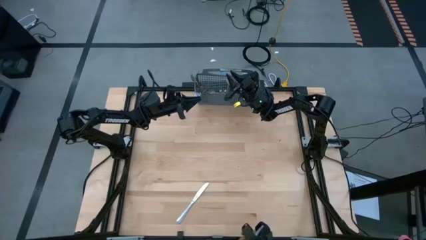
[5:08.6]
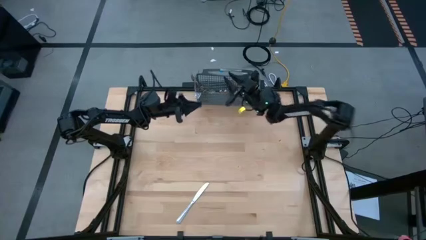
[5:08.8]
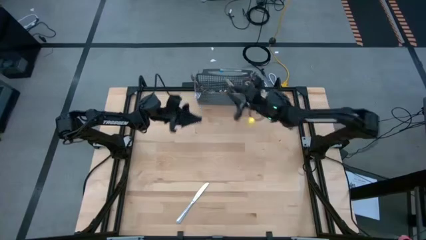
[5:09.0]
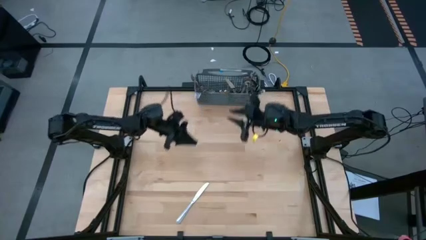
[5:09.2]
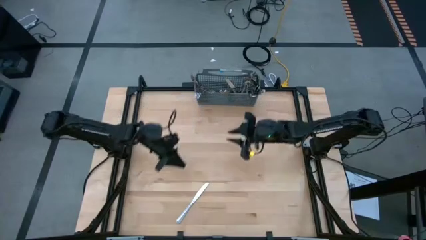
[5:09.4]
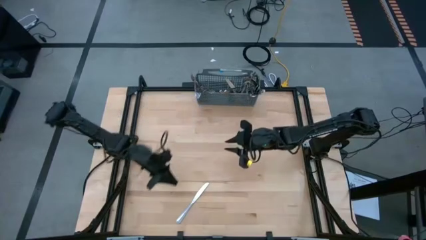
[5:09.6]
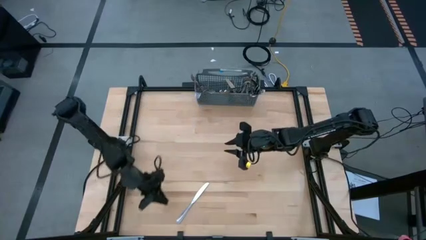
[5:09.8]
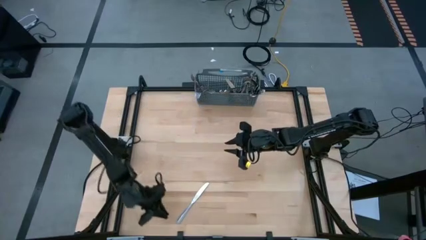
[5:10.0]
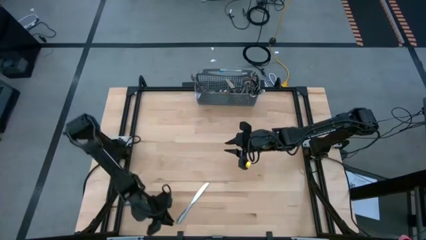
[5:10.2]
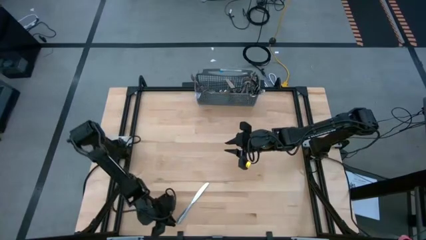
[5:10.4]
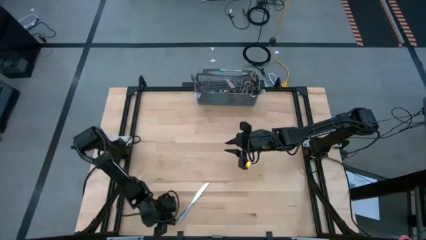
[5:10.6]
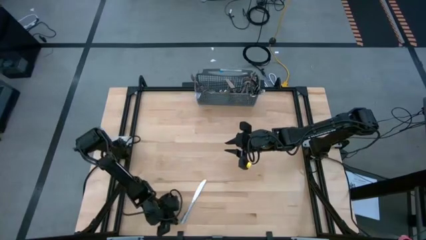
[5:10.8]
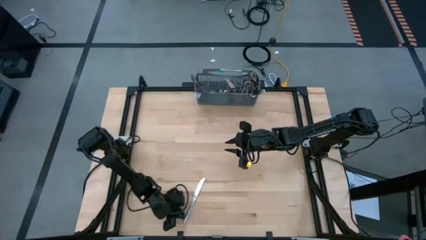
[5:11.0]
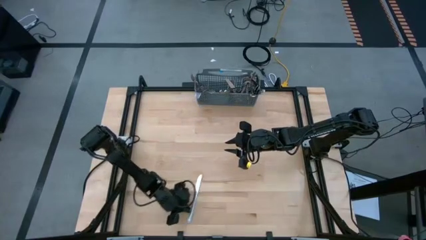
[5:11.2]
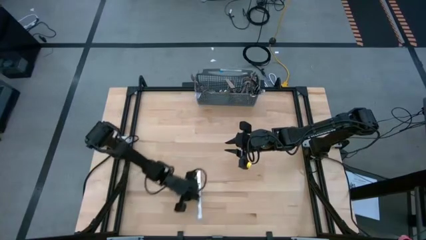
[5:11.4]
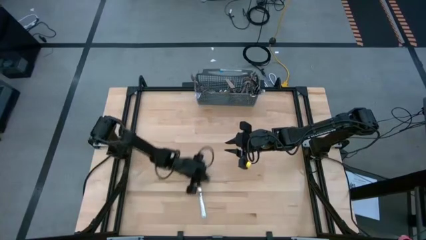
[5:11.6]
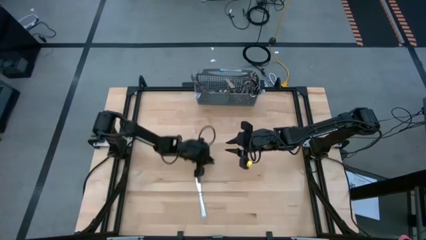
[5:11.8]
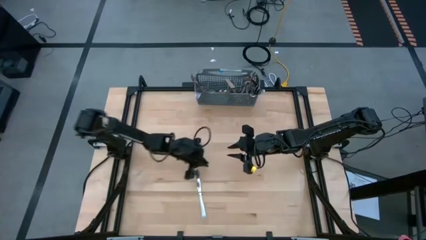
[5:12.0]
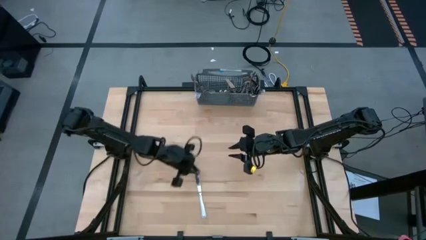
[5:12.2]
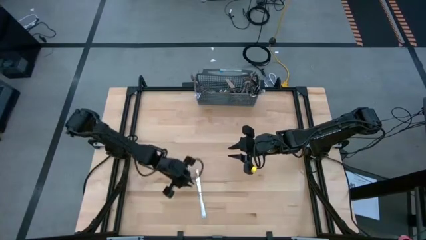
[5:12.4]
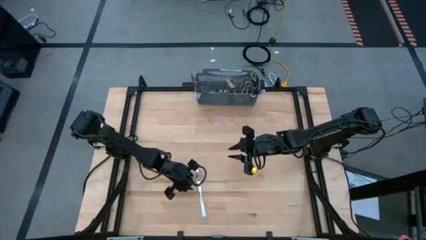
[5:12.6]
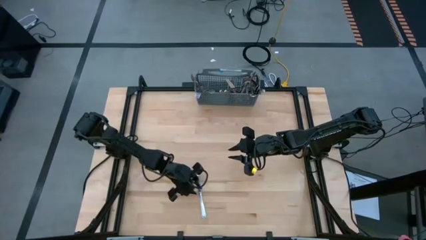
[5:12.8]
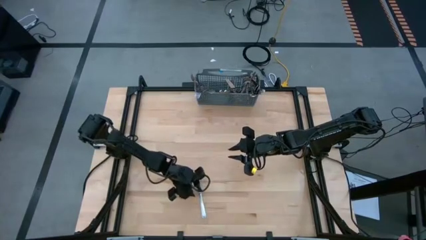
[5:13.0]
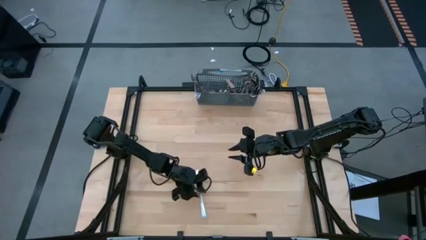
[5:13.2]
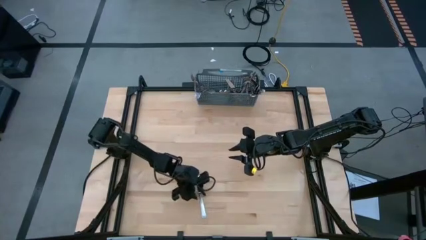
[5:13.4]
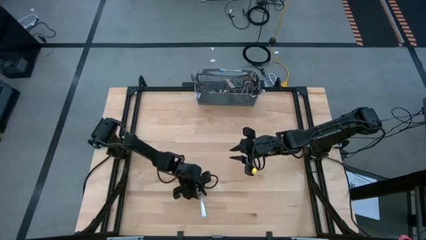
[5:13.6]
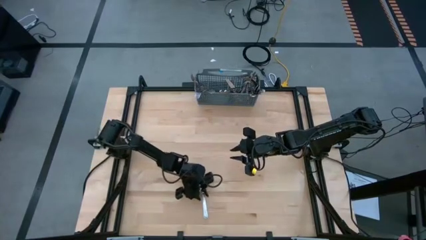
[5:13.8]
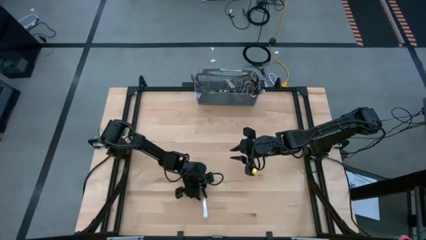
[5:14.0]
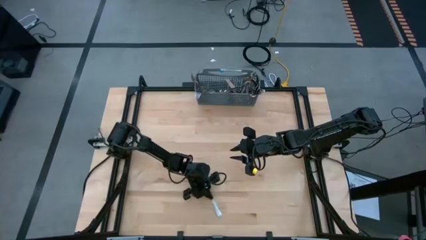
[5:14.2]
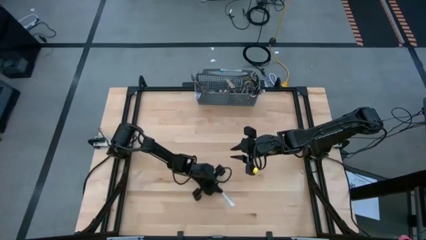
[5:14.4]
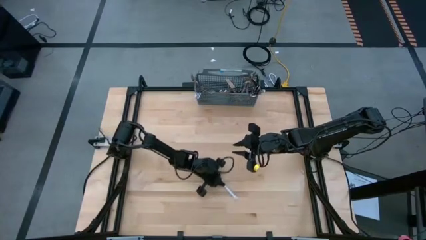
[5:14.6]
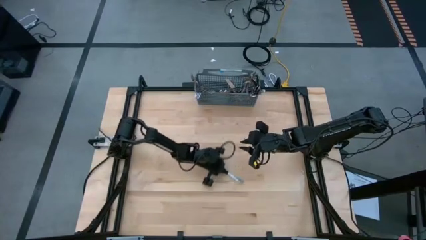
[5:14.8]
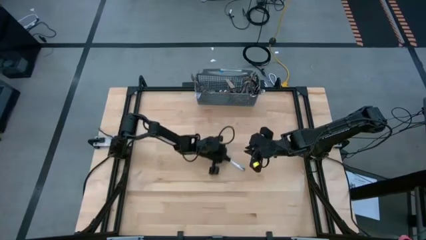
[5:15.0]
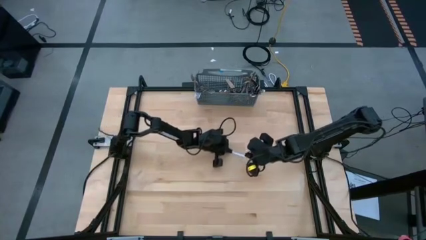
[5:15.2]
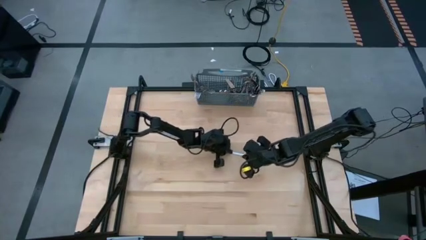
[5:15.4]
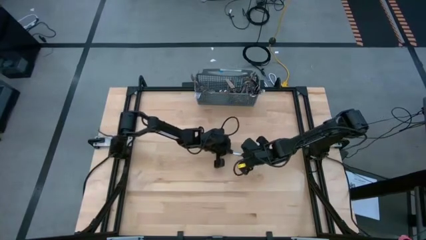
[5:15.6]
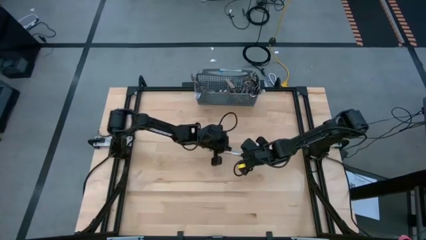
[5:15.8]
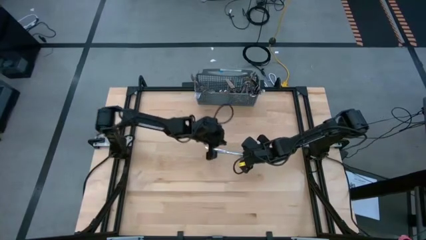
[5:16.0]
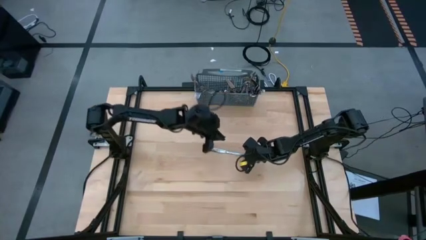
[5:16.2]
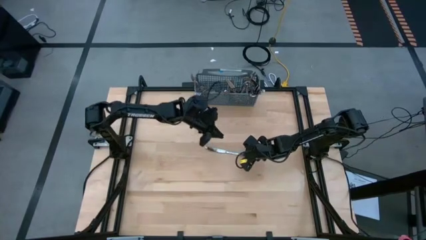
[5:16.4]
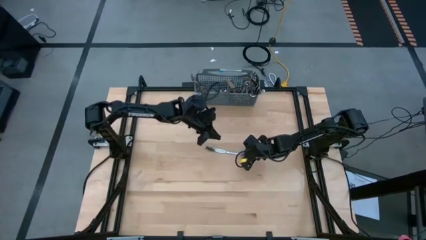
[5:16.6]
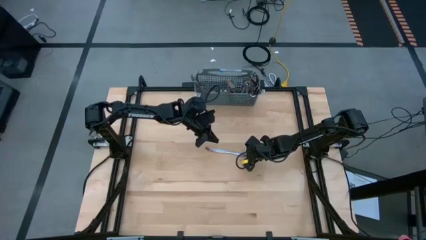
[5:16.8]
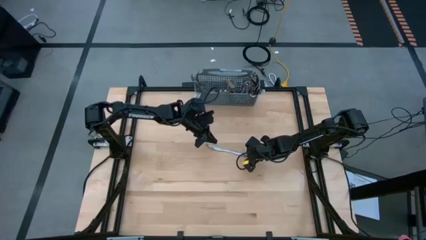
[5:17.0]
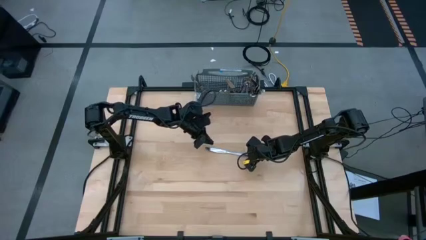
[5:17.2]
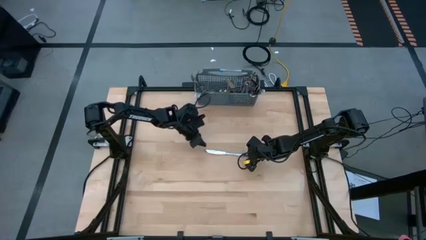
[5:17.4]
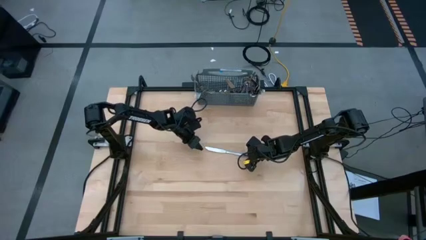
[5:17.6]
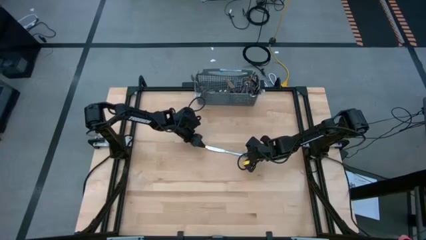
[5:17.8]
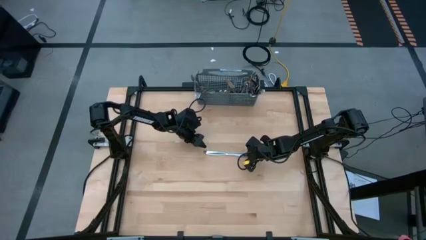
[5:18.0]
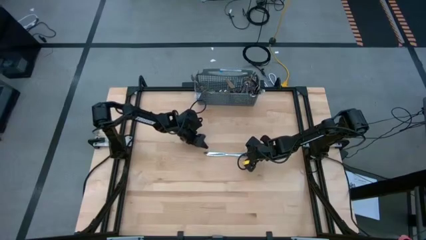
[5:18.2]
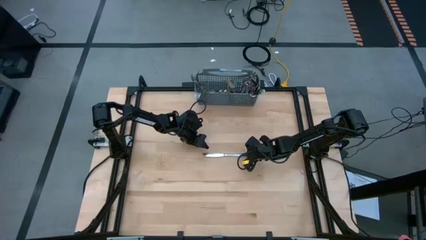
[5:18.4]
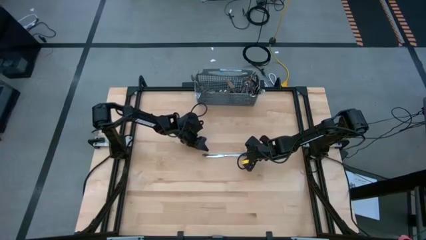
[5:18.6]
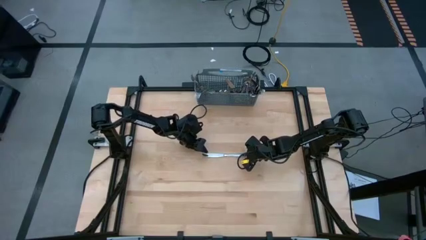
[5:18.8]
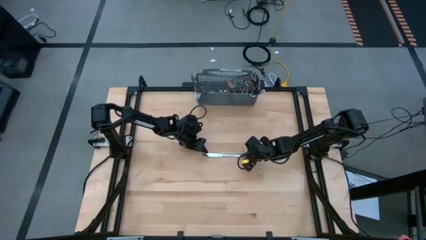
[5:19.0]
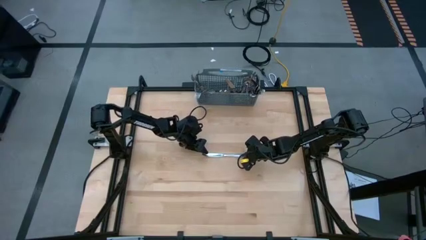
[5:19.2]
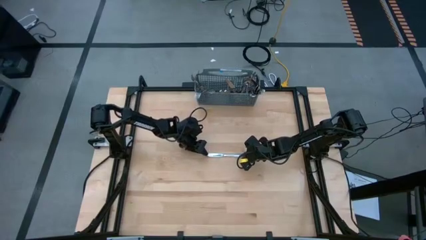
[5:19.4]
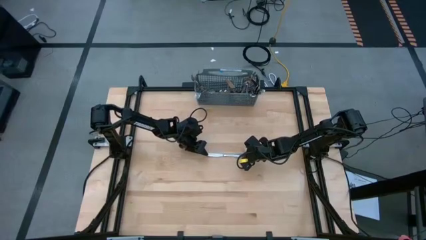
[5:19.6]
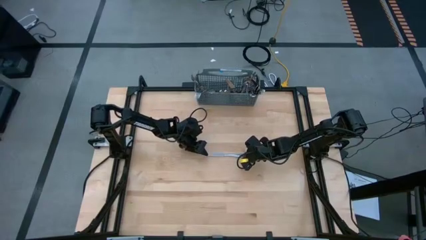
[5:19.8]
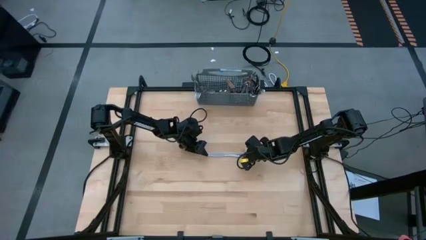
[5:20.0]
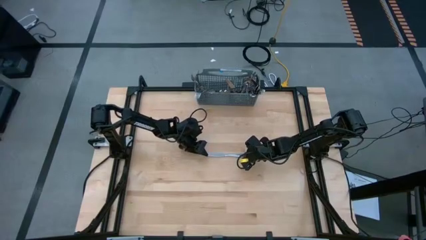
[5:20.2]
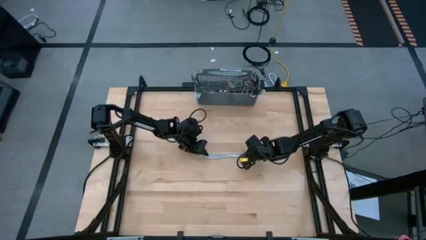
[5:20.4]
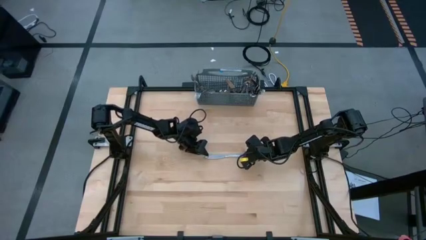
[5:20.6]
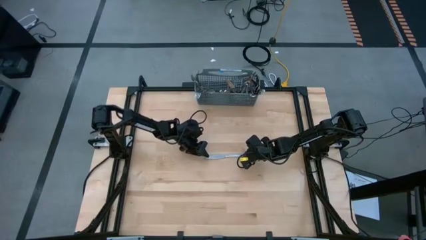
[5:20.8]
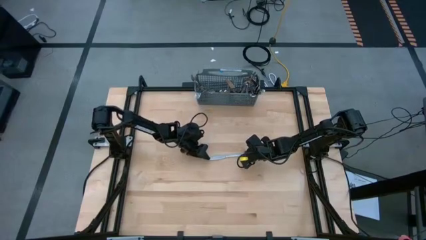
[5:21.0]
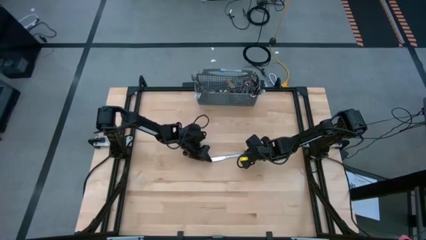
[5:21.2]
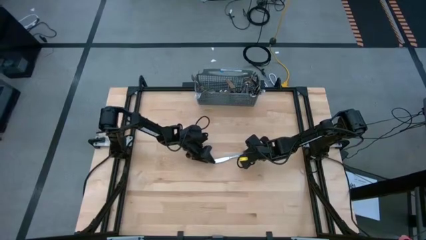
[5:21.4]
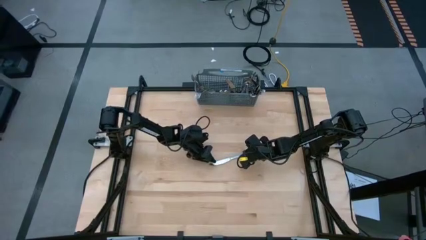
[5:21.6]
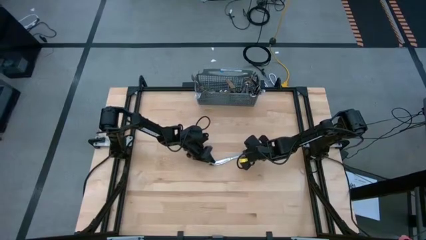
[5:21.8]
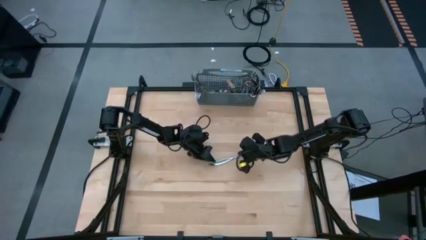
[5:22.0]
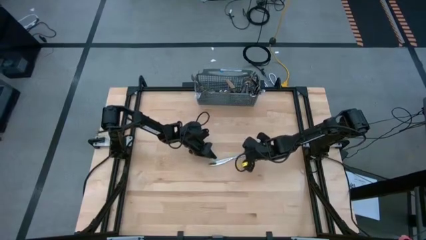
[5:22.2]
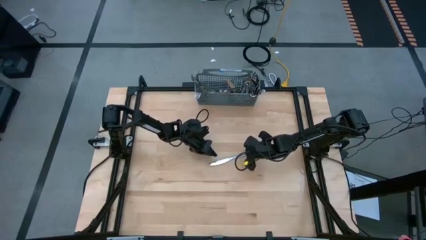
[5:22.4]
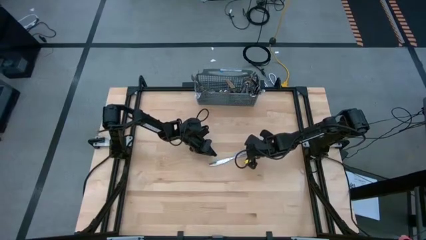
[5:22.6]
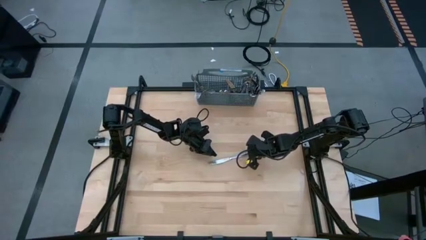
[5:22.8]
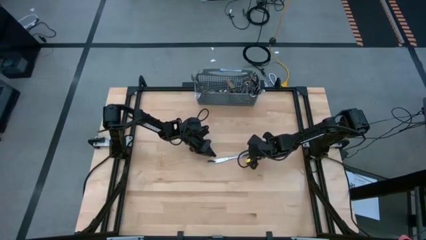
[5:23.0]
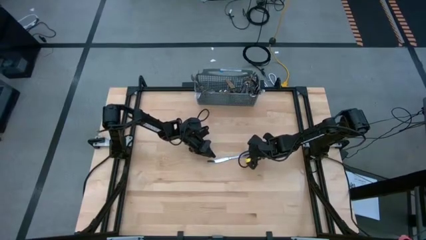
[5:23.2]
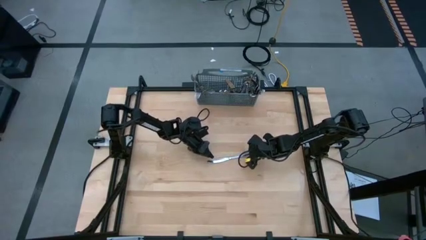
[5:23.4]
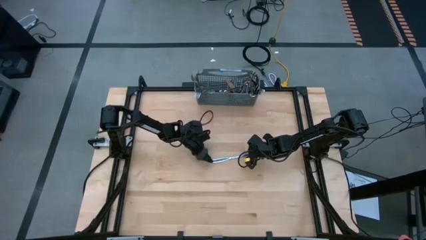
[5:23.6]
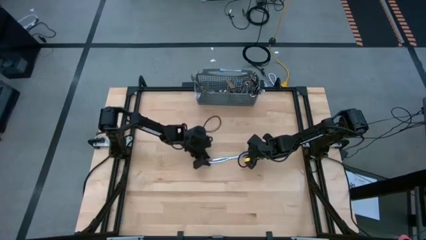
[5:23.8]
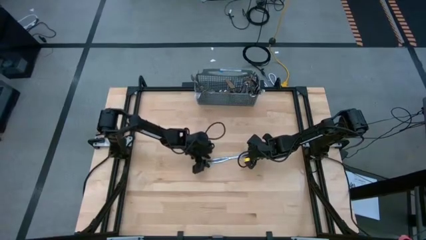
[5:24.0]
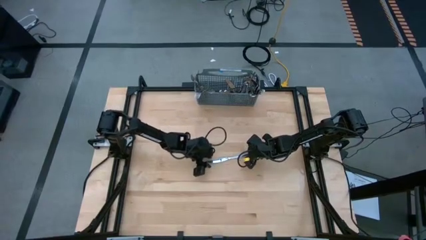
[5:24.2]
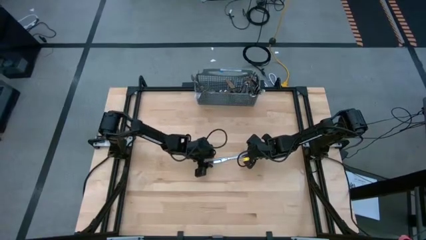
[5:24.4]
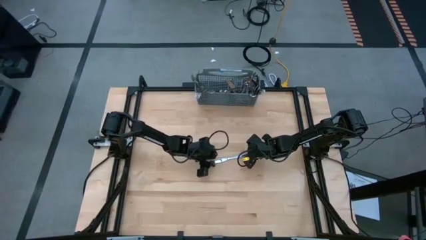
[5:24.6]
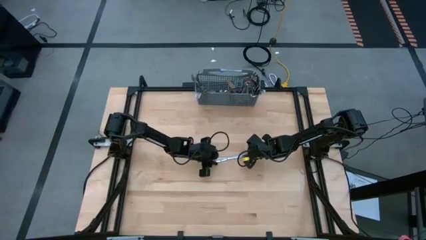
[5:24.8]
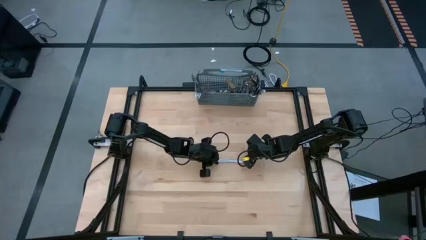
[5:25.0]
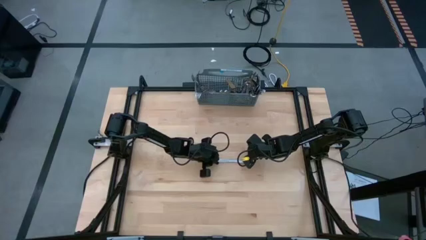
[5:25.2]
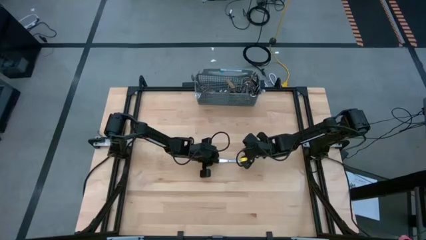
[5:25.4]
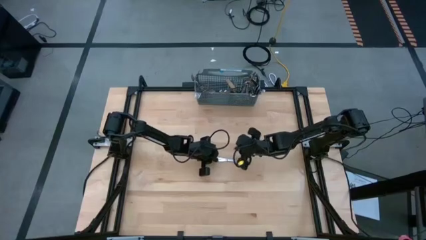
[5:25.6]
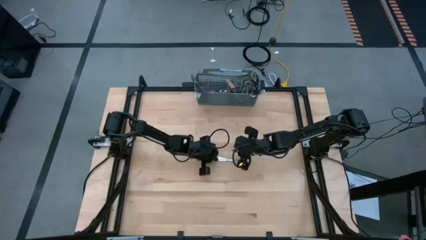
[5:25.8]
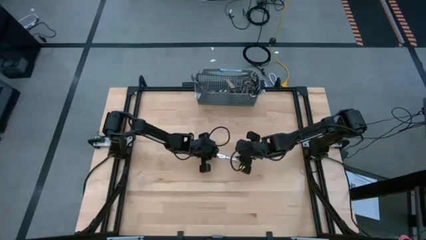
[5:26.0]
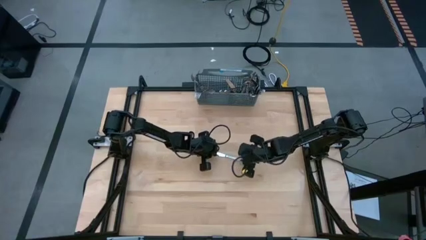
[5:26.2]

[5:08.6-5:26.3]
Task: Sort silverware
Put the silver table knife into the silverware organizer
